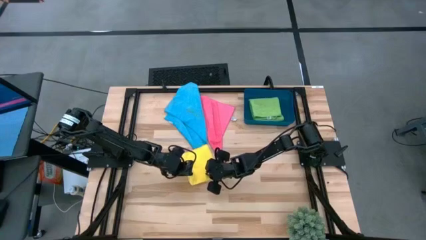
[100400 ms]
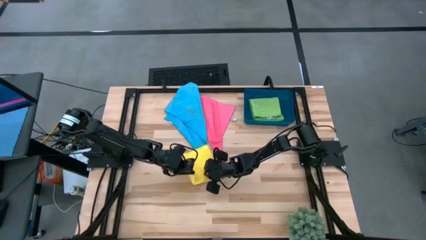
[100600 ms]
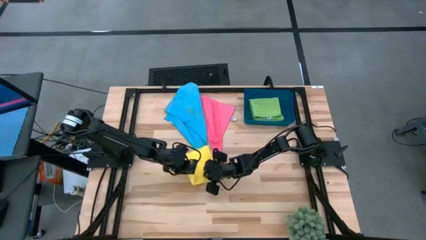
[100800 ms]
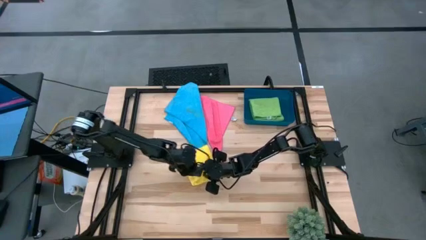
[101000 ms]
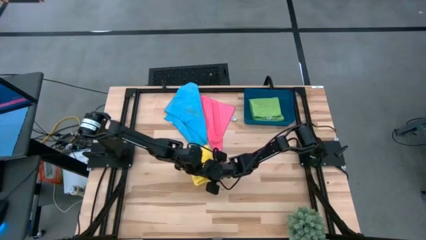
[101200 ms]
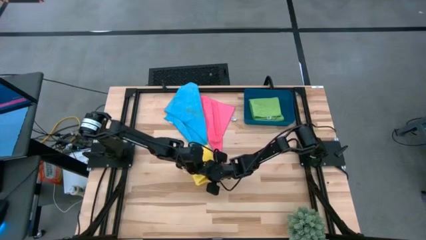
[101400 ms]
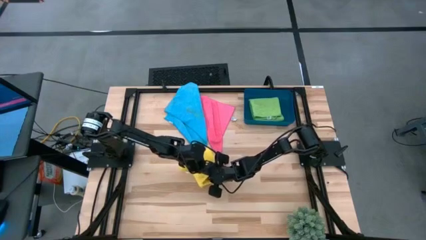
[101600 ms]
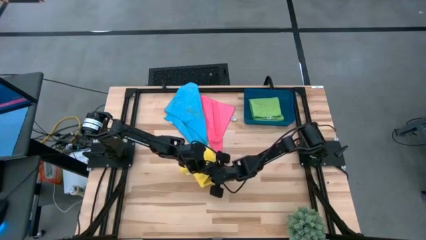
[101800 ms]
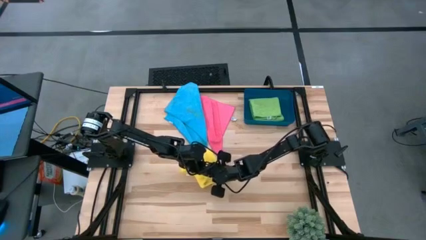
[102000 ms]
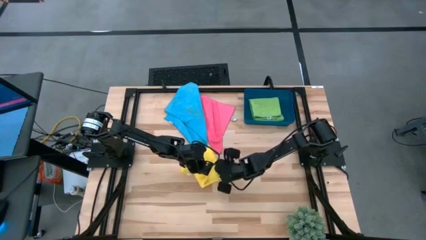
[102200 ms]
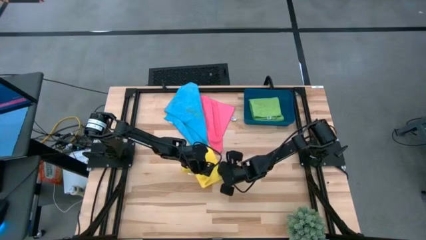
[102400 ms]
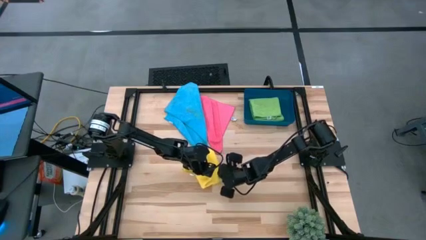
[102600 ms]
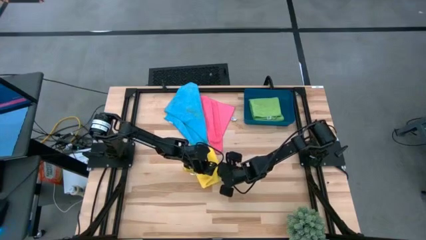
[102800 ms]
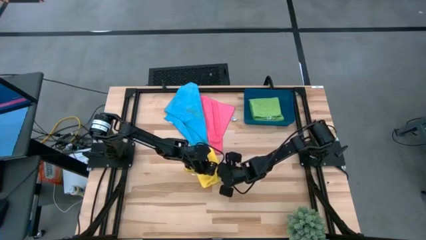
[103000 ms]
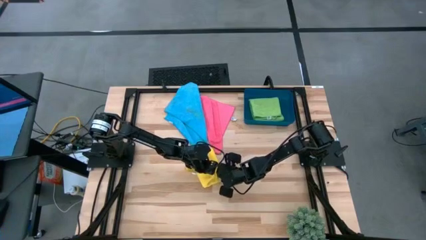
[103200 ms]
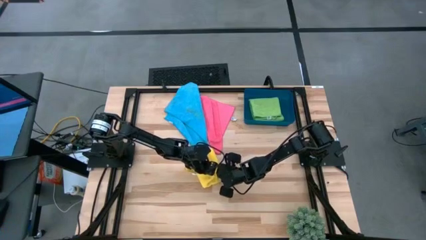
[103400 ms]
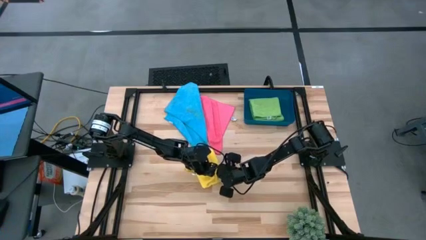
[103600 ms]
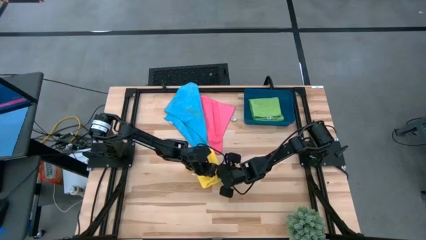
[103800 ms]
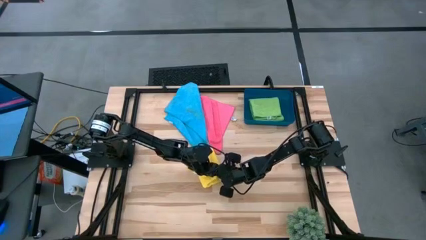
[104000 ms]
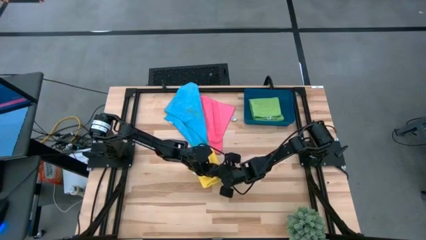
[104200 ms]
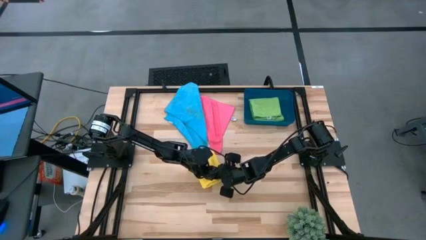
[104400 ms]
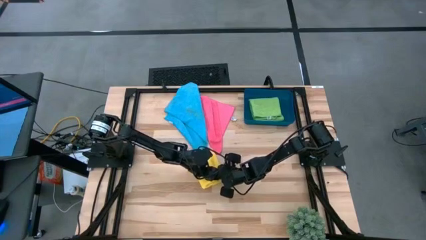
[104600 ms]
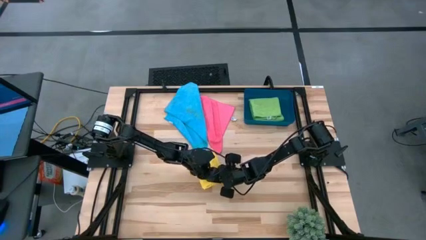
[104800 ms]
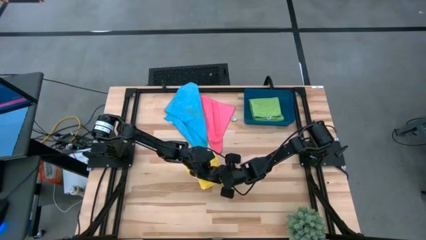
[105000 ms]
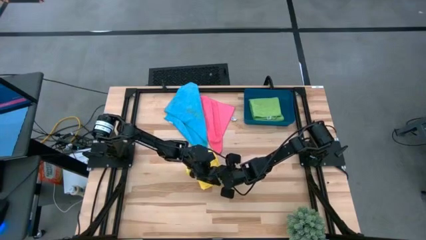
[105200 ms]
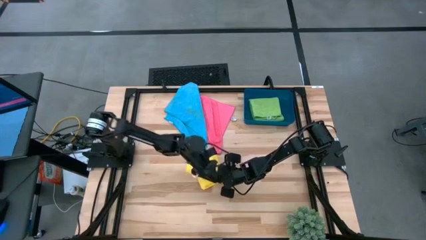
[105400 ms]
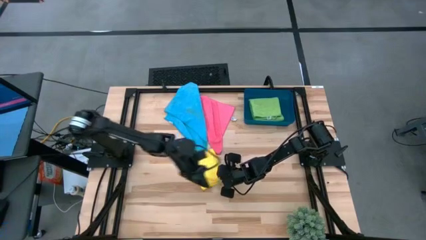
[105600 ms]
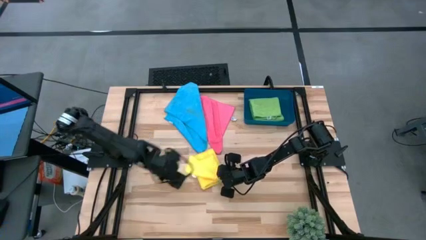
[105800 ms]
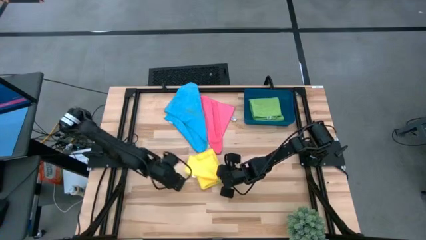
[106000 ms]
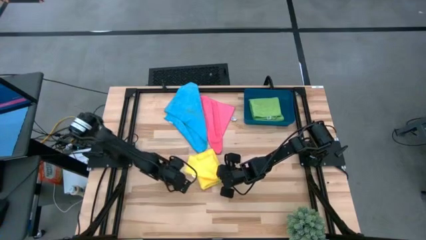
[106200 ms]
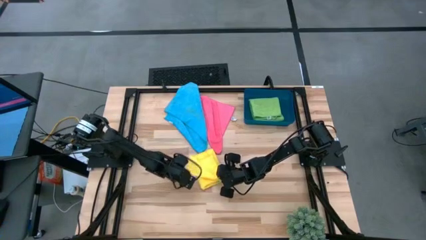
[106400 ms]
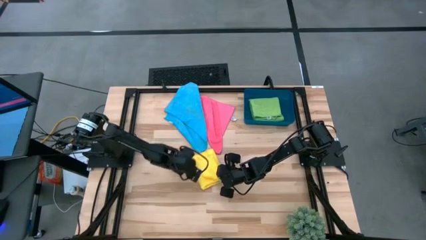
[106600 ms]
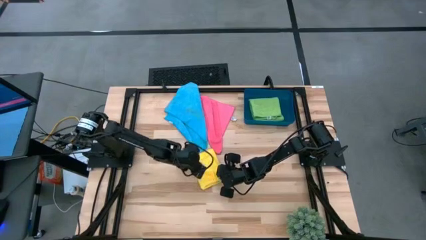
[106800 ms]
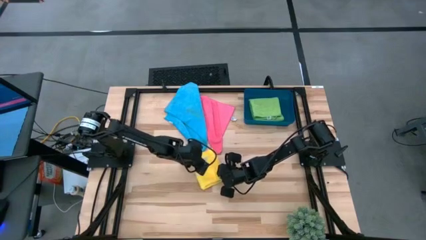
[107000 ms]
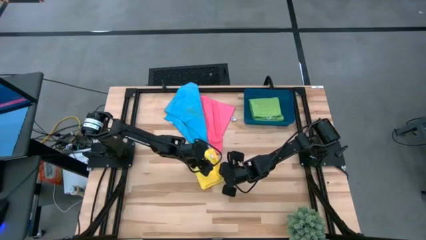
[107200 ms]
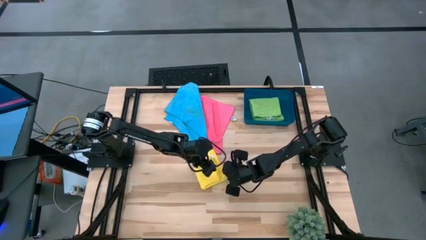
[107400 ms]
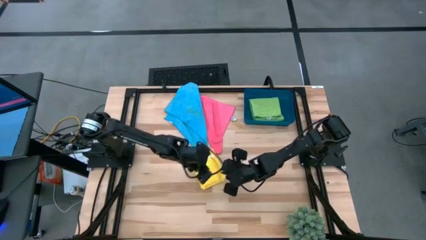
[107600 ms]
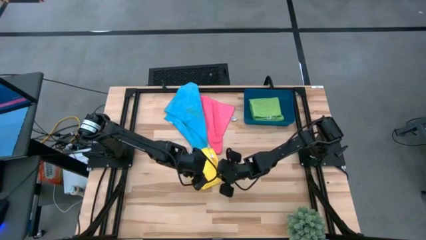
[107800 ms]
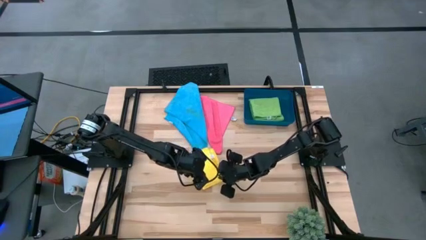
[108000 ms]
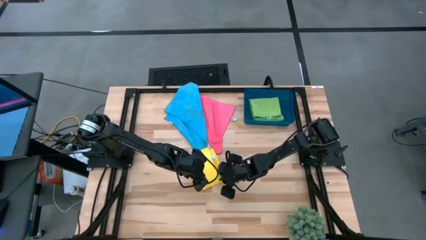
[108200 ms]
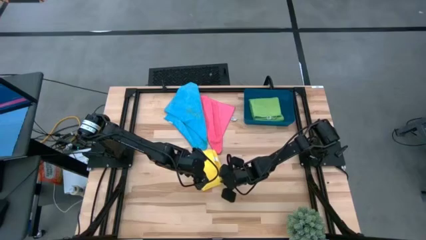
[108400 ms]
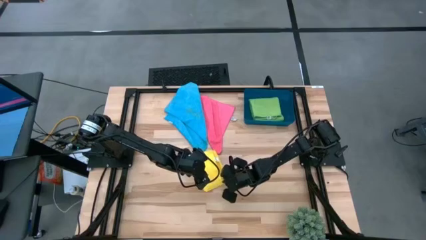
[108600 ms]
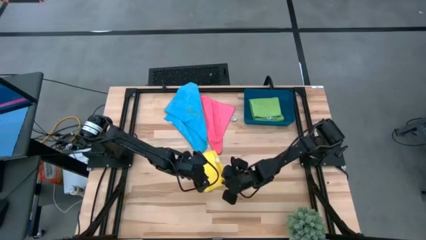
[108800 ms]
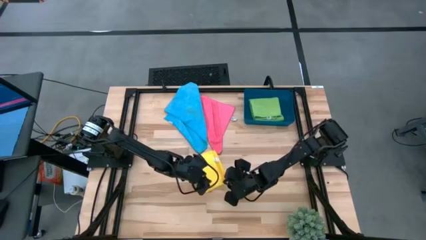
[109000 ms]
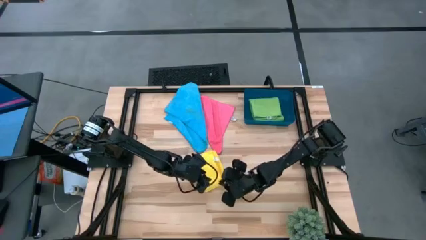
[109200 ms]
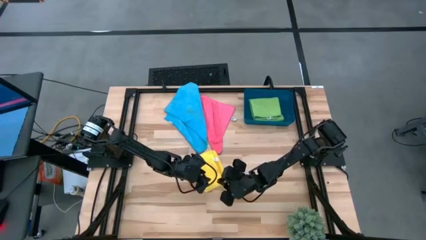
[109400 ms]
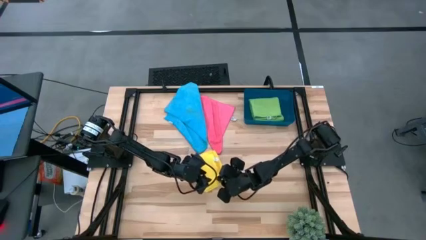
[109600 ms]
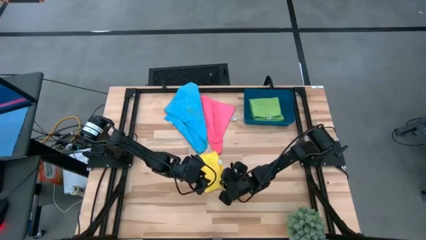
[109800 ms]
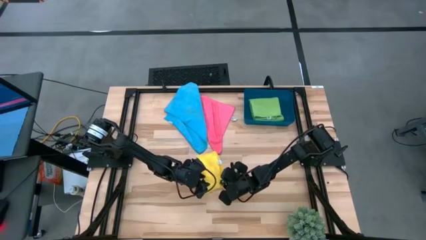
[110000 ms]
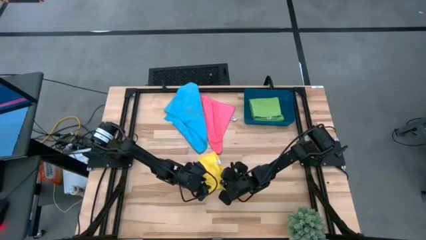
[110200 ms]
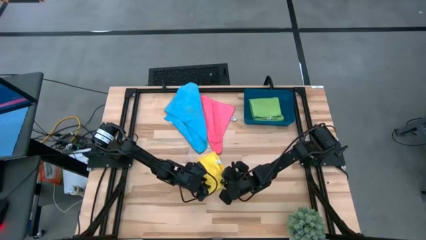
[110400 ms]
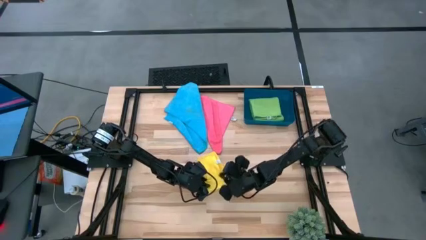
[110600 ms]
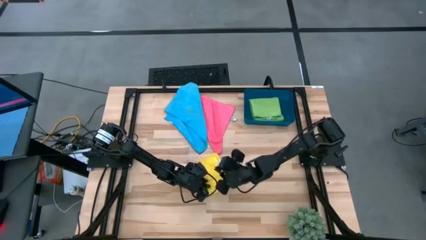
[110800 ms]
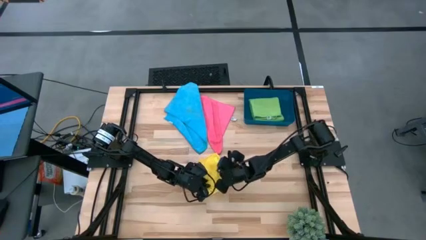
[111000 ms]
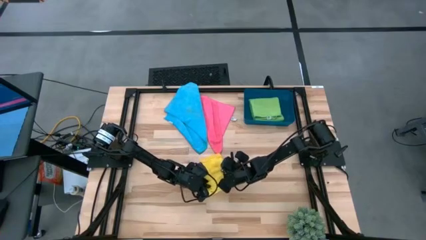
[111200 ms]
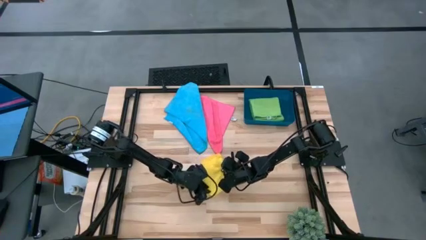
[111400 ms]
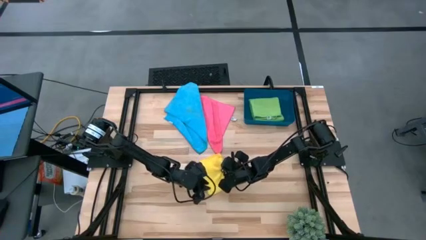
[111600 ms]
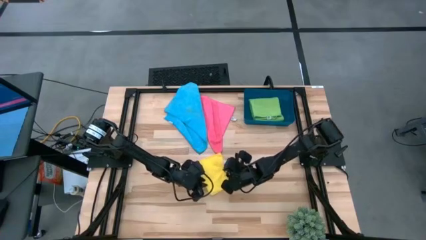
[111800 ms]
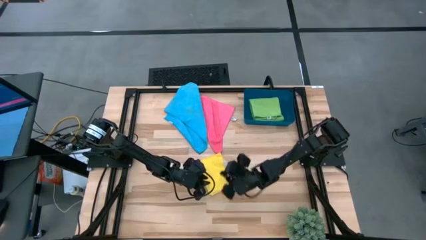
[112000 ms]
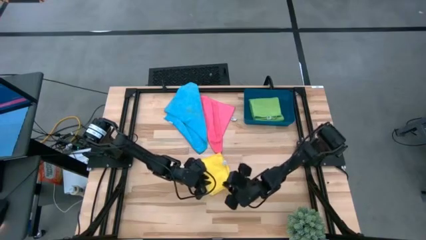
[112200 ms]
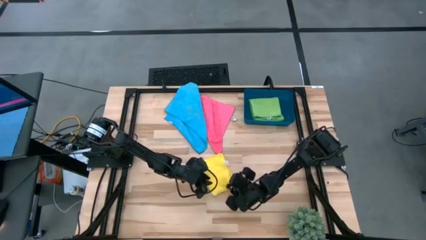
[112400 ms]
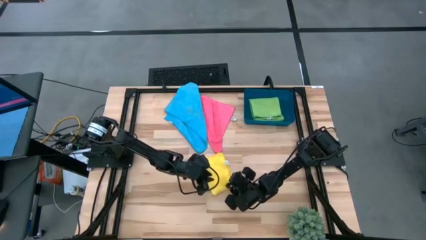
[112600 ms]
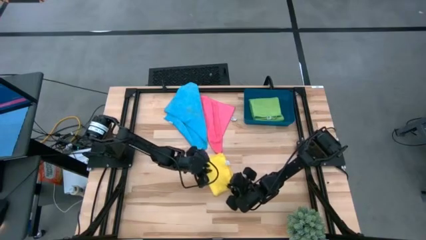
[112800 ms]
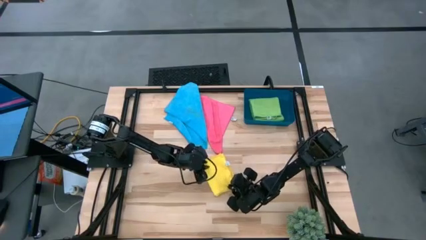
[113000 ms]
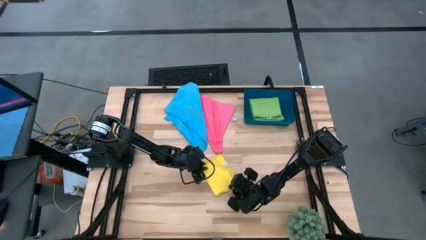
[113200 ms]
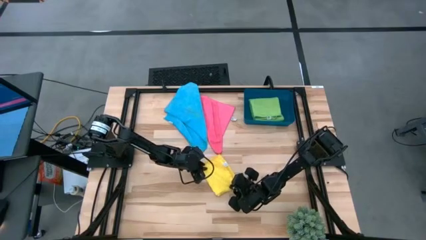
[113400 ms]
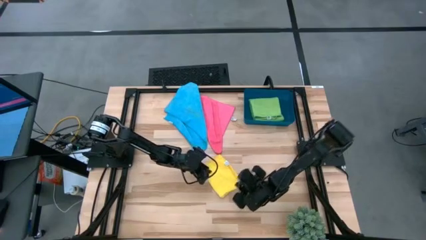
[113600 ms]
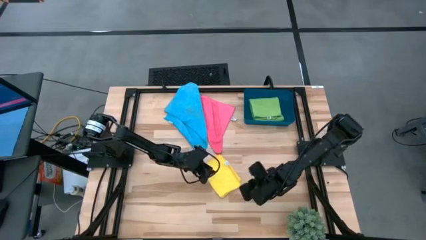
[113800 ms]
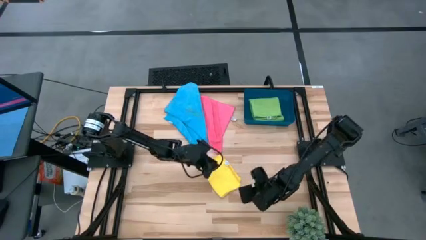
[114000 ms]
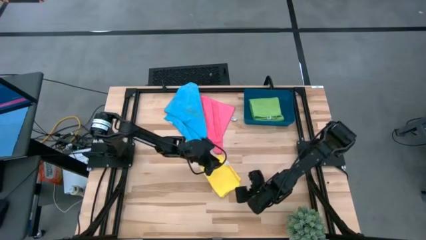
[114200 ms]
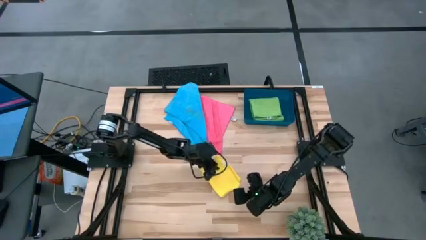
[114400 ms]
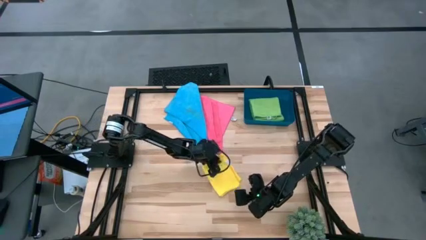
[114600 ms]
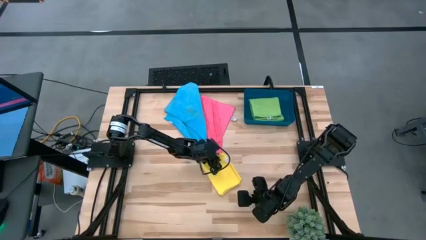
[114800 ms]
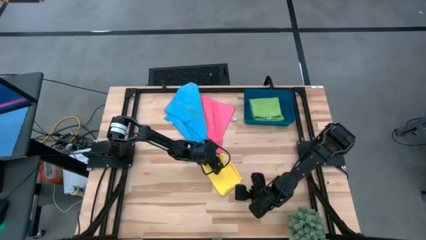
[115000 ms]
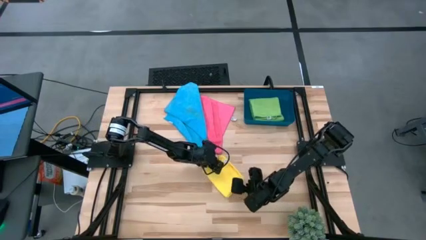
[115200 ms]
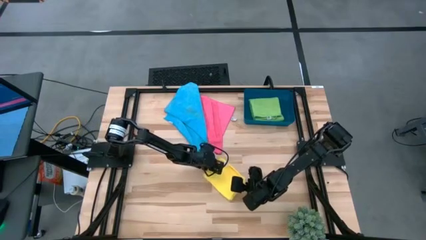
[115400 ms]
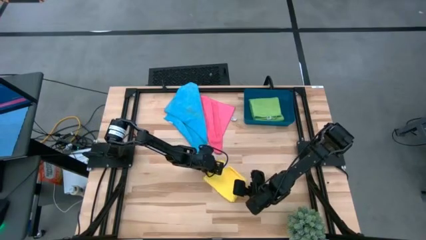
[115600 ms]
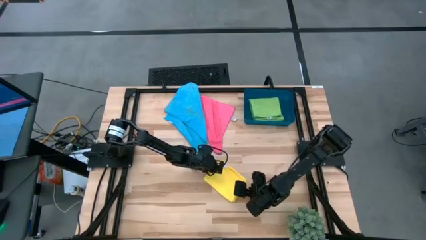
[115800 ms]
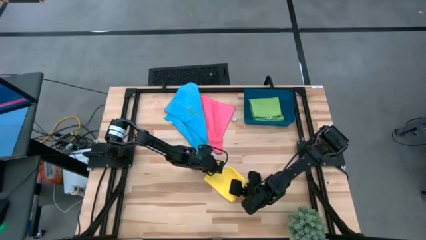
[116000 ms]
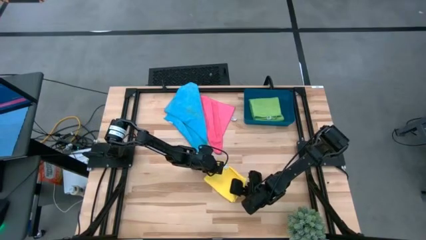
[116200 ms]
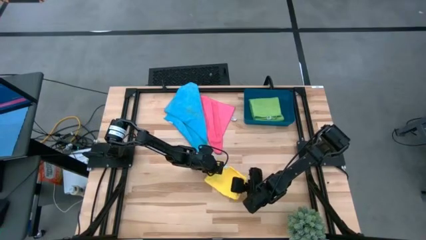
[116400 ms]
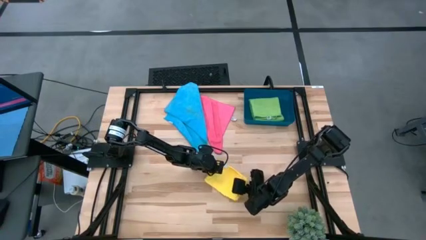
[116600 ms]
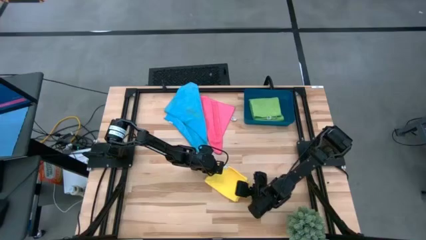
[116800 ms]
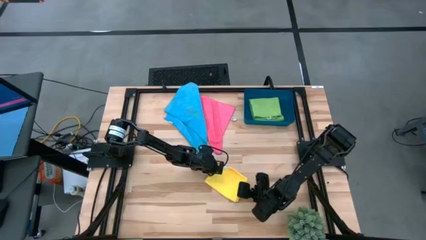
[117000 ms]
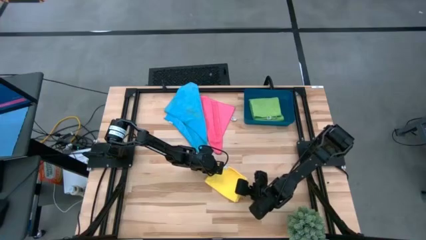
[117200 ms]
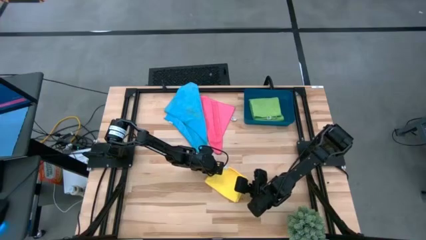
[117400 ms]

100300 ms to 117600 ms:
Task: Fold microfiber towels
Fold the yellow towel
